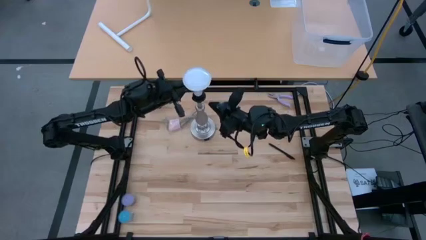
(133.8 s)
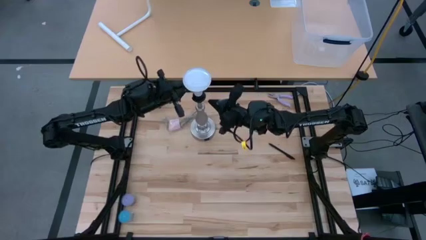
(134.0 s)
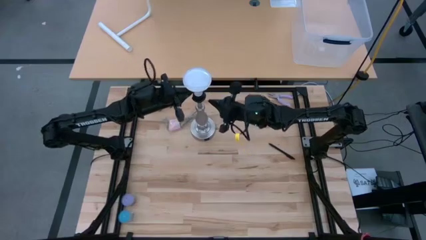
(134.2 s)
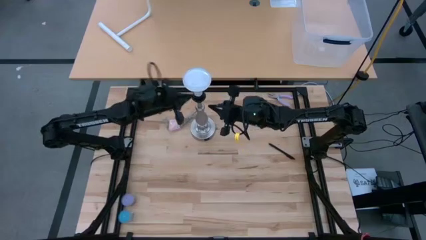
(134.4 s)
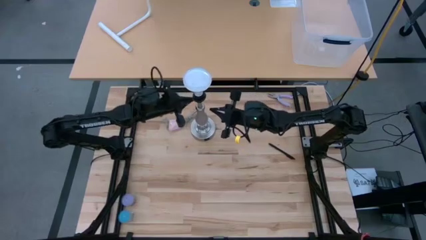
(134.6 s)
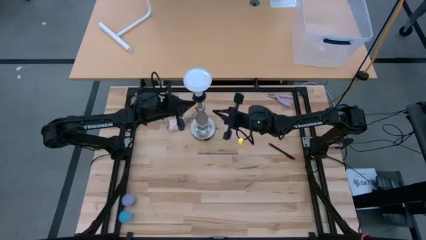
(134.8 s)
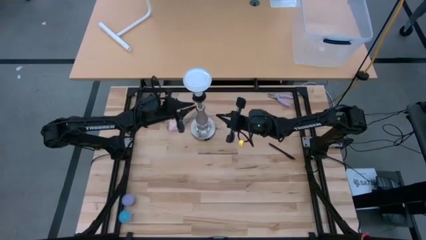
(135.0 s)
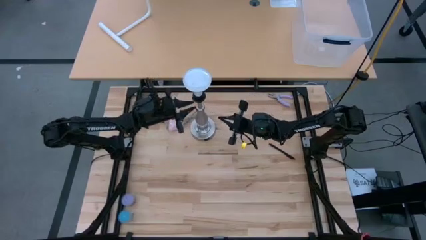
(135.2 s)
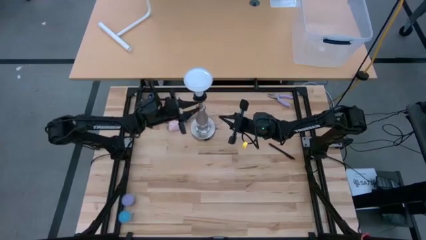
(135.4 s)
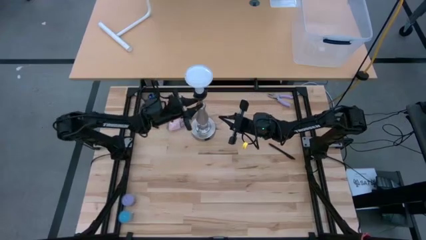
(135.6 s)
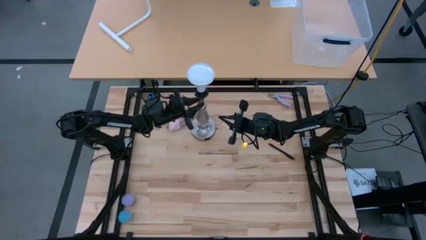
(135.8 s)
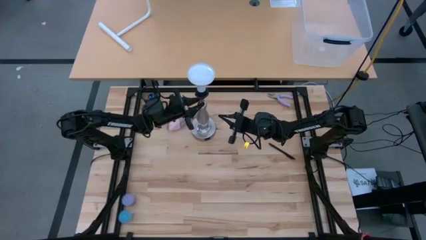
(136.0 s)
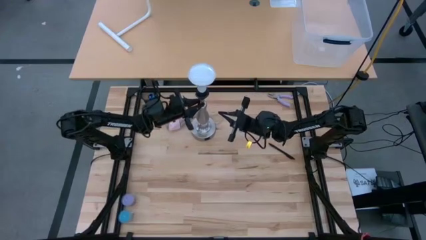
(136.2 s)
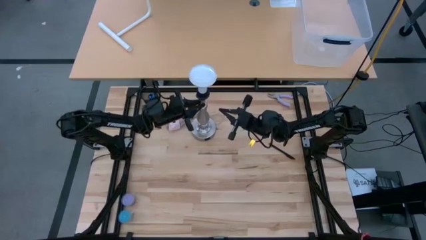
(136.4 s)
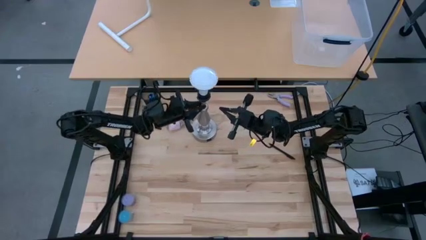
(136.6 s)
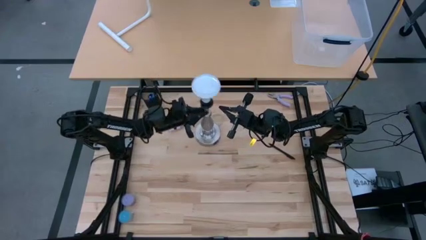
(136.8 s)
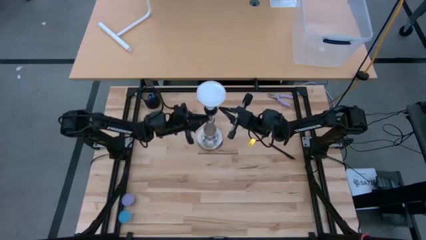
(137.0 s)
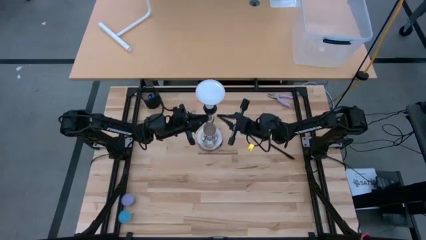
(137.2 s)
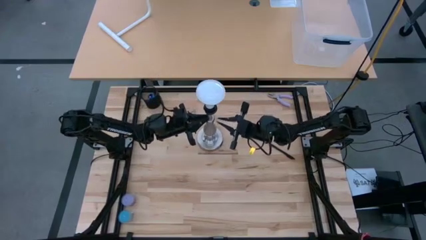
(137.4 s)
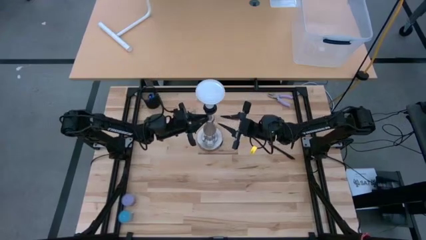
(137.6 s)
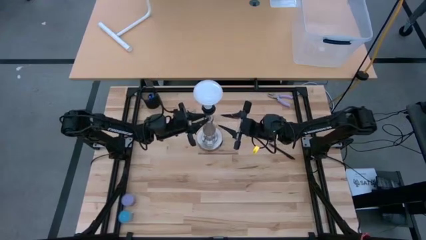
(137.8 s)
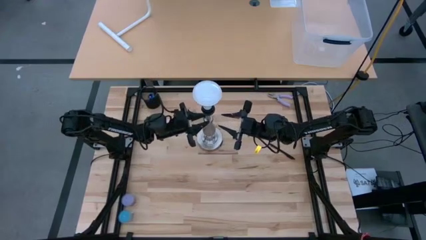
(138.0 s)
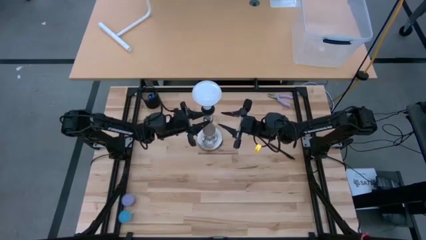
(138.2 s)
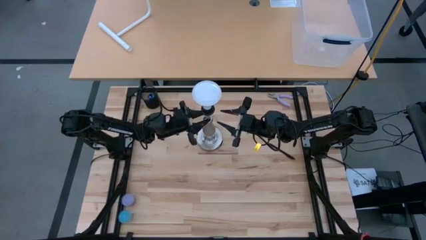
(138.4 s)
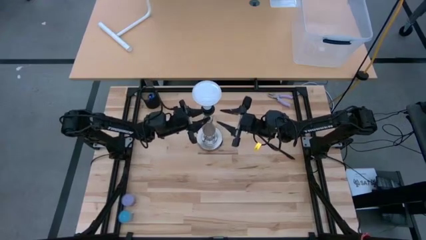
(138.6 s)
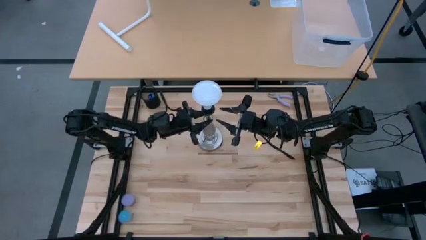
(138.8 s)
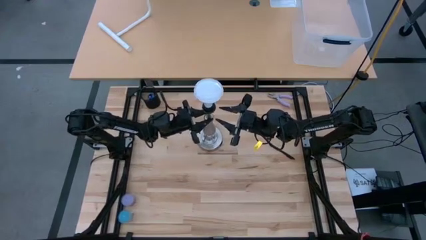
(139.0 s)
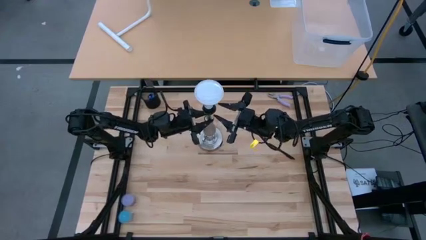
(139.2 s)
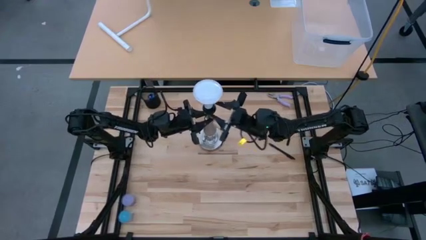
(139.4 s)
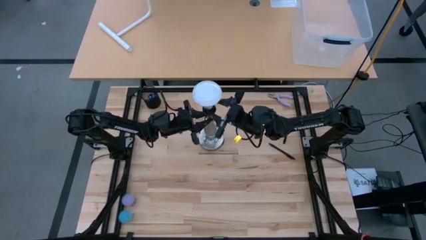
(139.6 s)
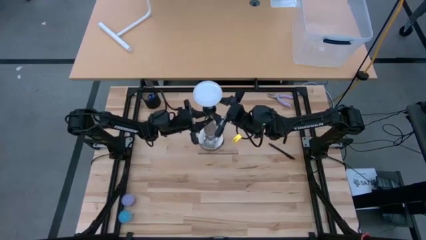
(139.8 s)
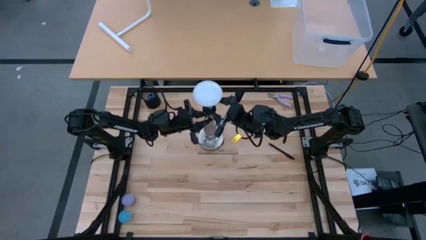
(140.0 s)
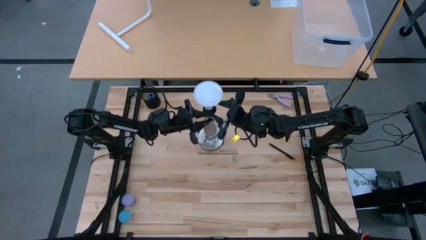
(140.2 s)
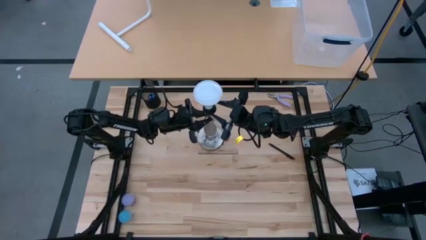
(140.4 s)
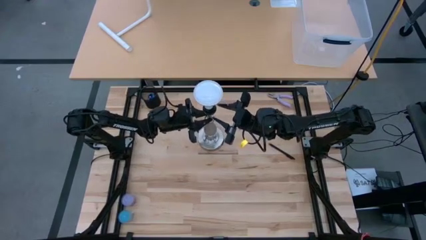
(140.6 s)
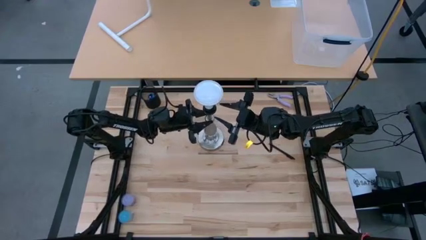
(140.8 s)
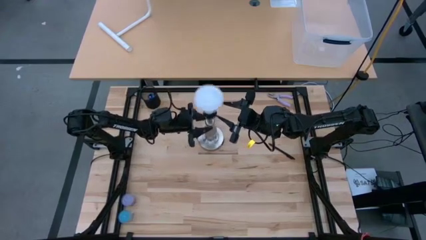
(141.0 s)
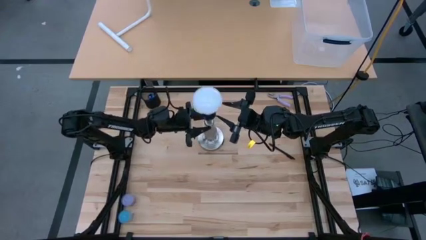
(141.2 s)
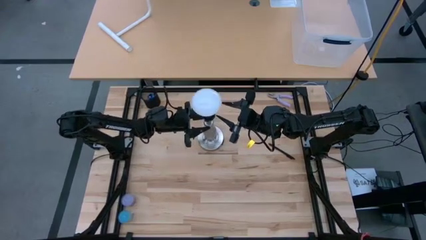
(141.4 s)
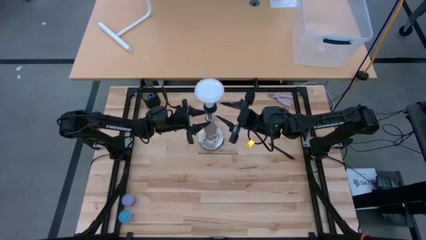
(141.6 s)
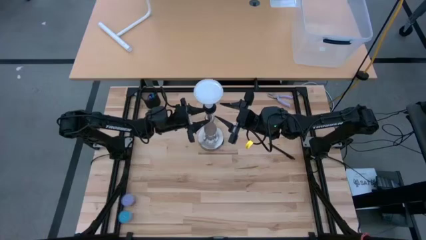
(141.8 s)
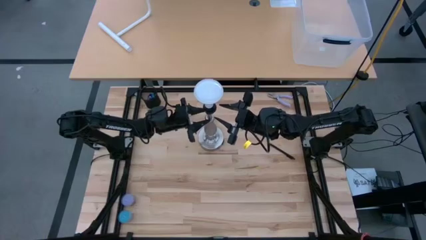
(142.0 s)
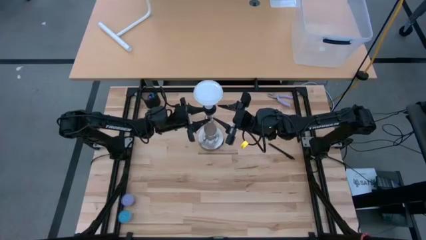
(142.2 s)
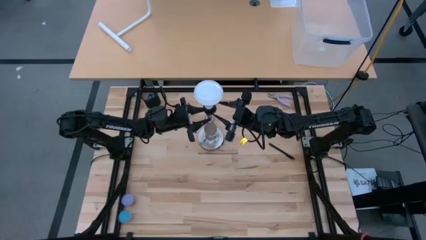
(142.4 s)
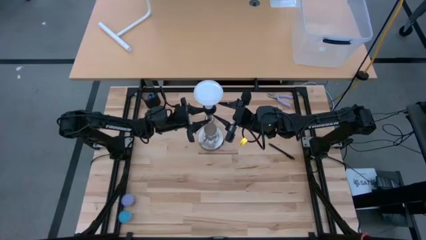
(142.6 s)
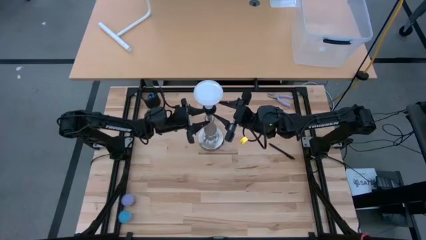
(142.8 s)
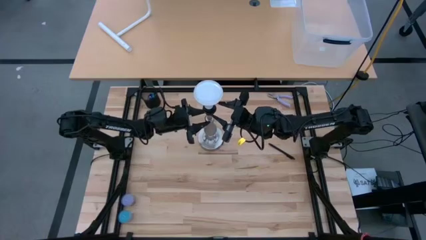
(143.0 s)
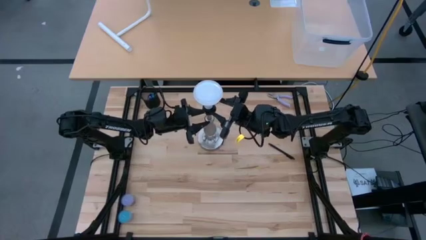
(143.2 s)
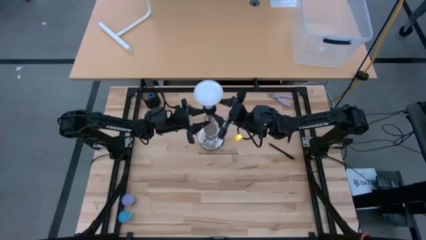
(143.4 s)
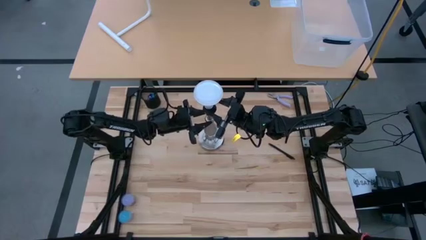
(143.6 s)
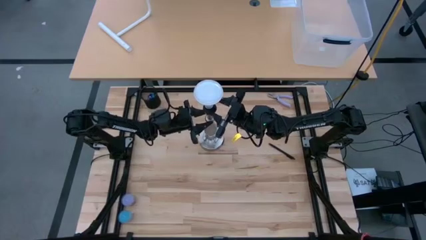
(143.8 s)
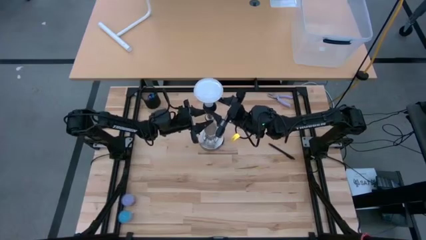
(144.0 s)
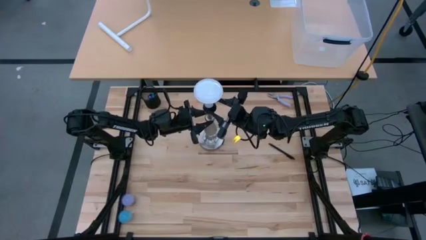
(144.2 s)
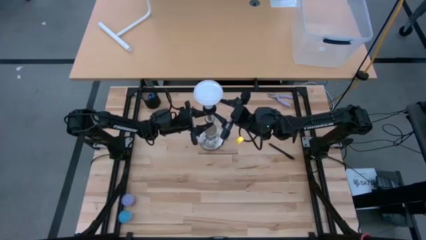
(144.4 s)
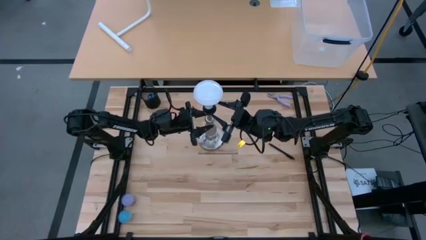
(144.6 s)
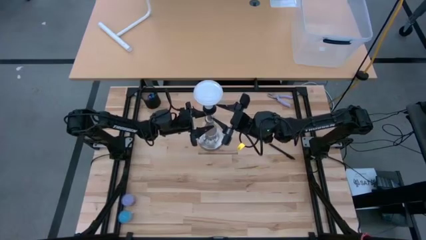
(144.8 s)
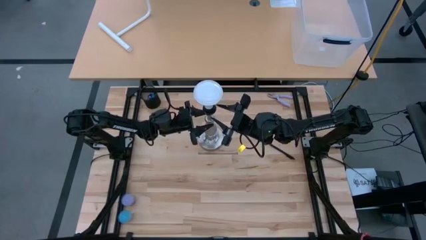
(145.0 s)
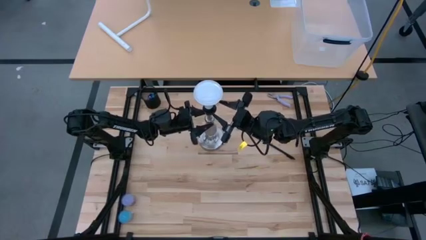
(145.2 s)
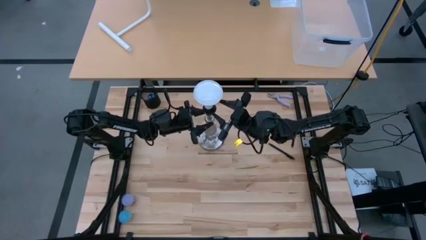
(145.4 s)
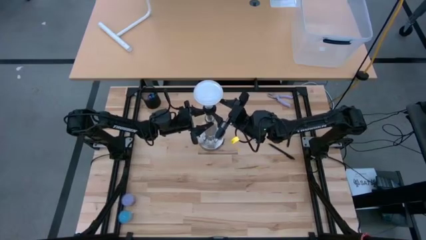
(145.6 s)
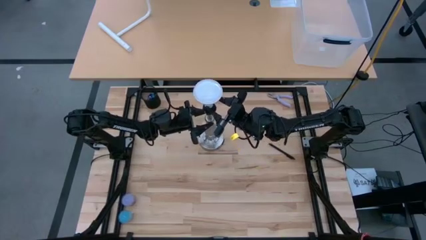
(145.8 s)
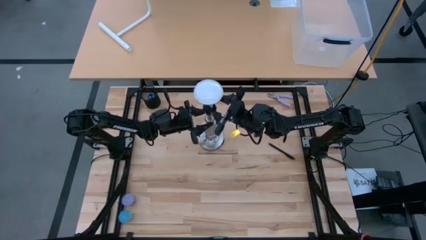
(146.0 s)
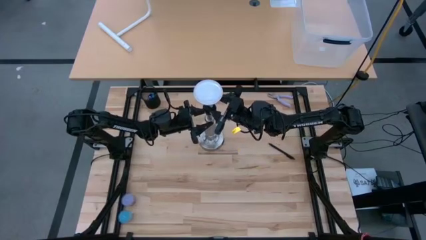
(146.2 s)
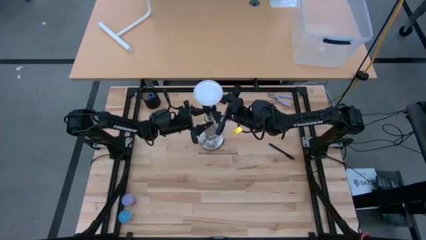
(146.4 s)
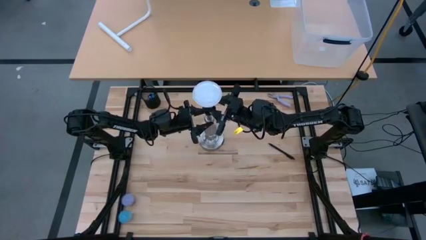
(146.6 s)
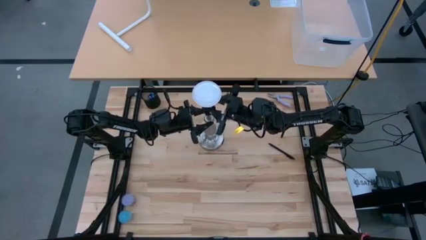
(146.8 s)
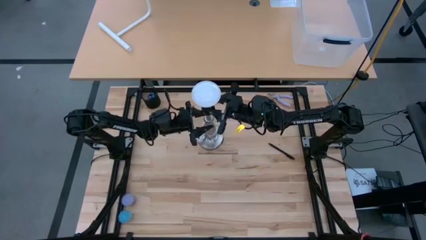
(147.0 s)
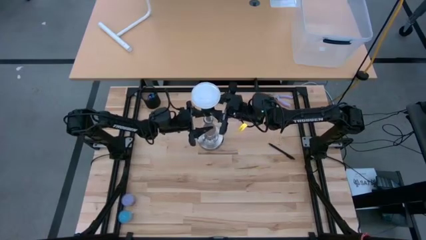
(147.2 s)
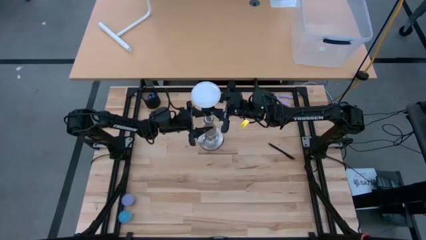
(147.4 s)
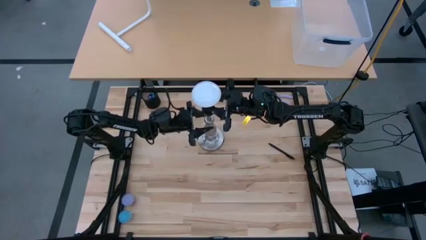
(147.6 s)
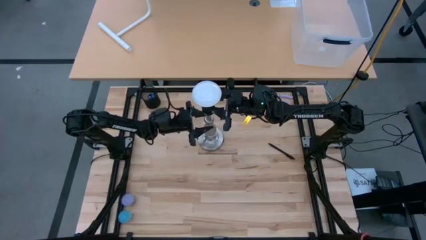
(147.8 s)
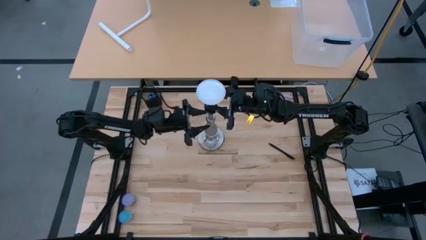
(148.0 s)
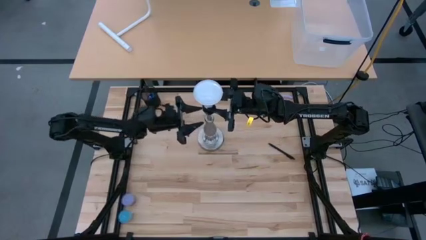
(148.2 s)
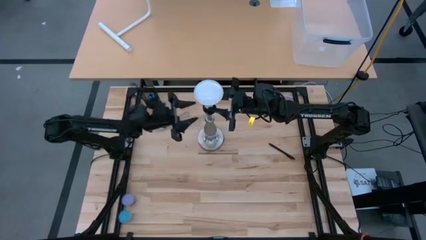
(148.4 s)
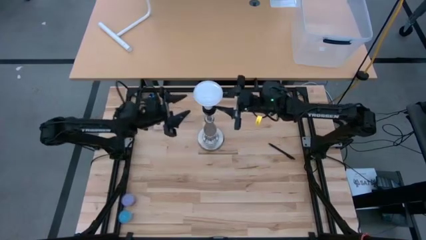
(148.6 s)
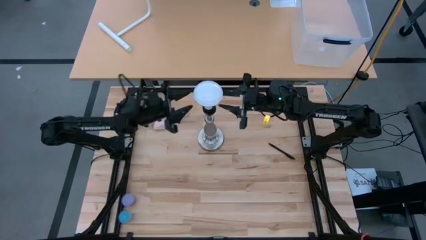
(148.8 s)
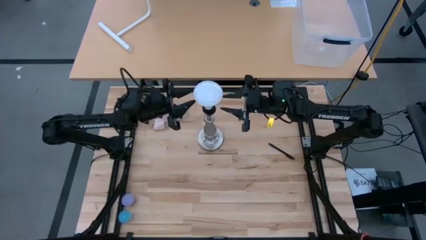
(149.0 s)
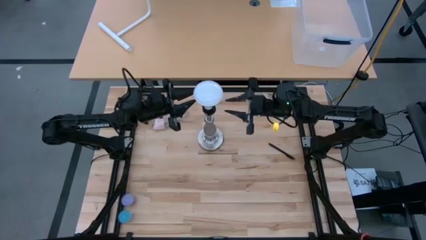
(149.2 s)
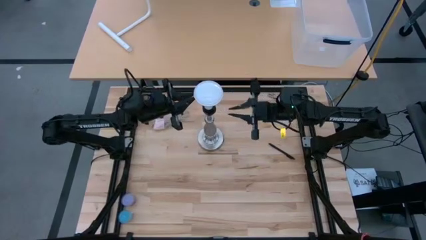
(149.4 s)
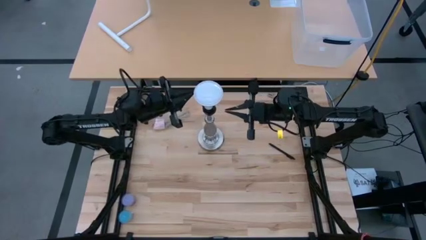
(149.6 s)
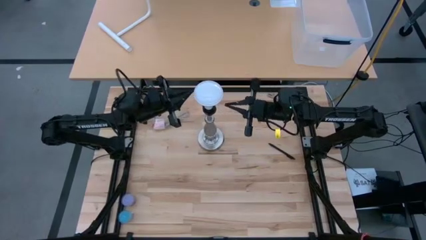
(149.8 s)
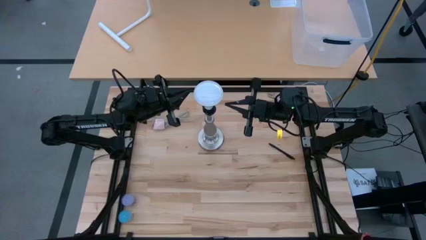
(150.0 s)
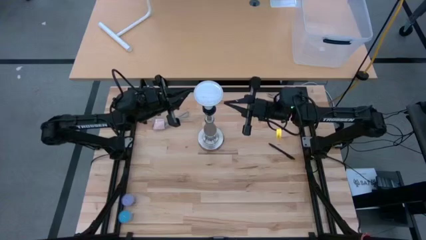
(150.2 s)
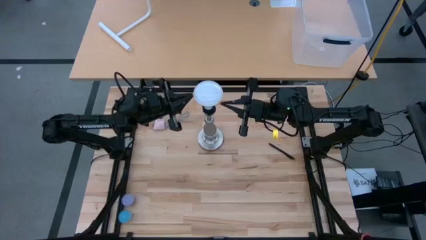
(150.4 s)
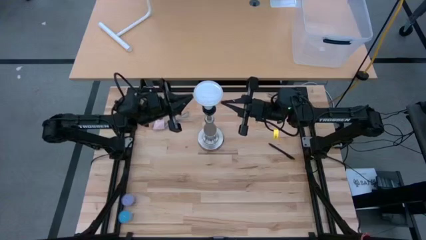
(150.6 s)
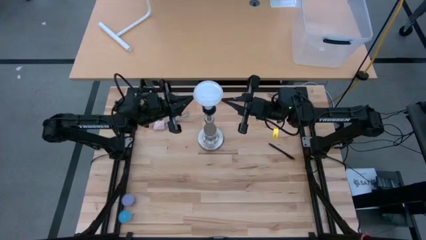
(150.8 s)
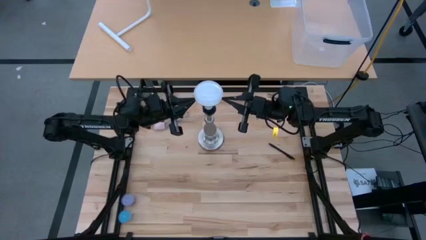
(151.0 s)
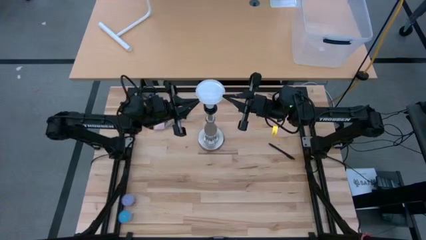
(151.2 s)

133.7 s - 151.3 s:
Task: Screw lightbulb
Remove the lightbulb from the lamp
